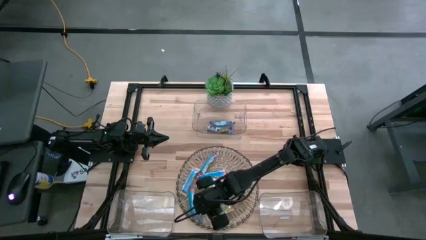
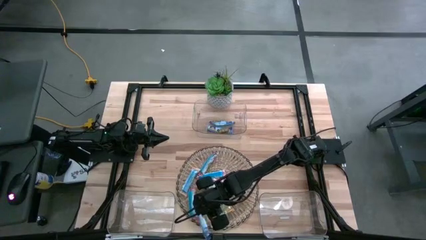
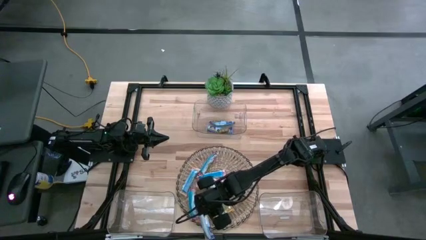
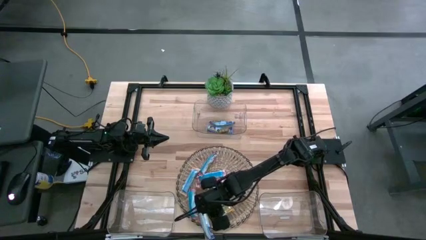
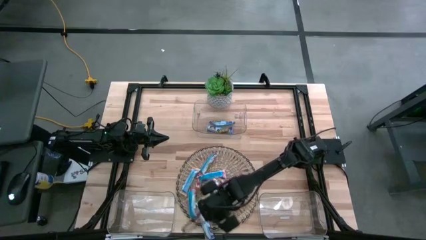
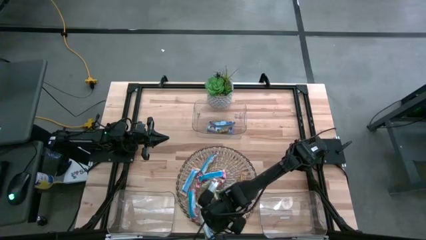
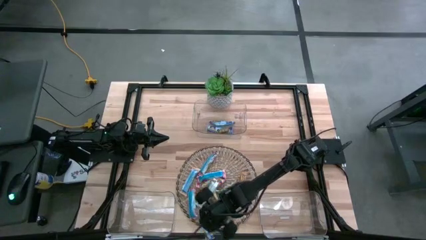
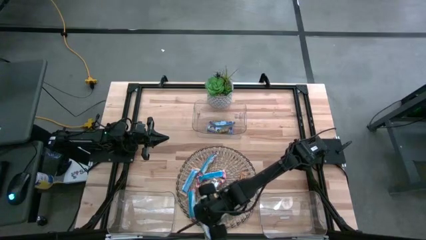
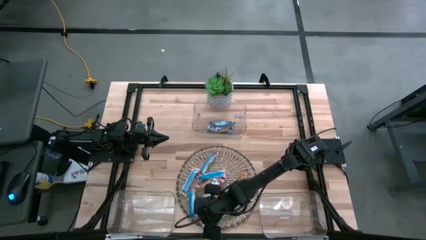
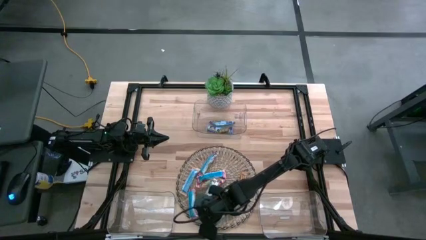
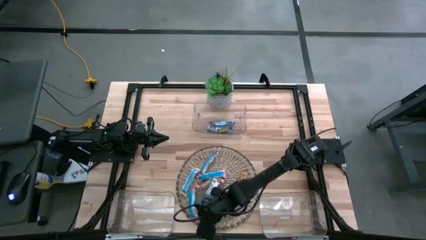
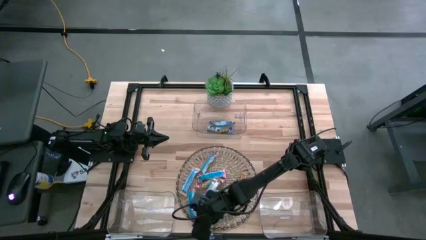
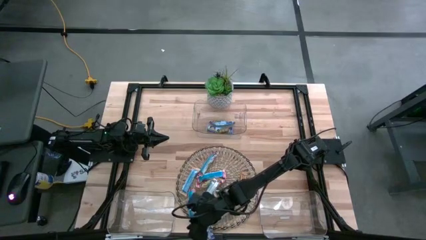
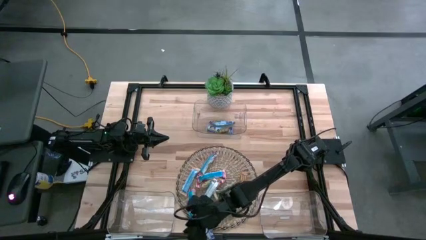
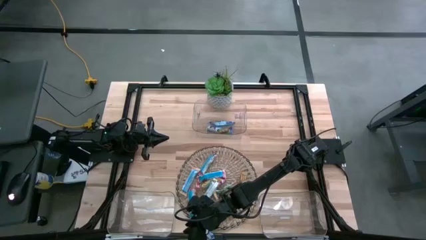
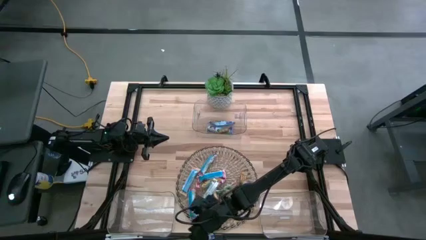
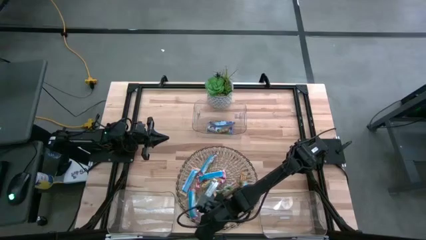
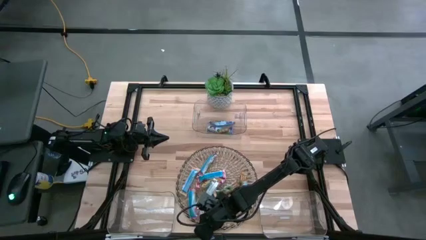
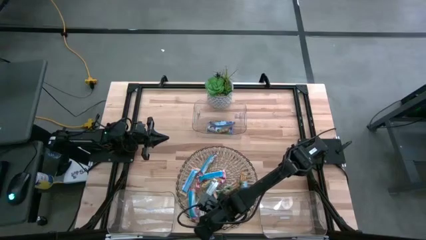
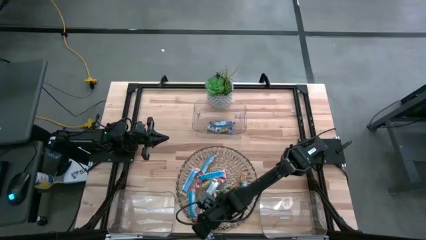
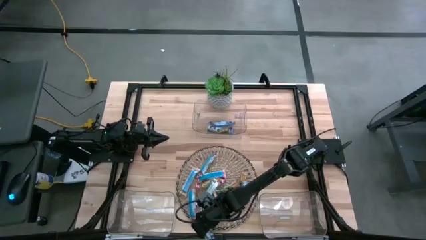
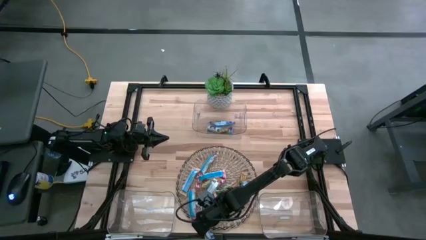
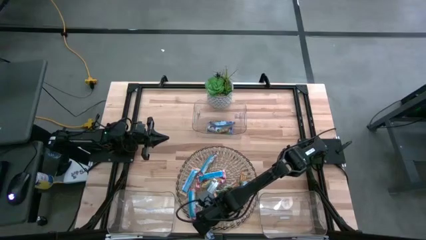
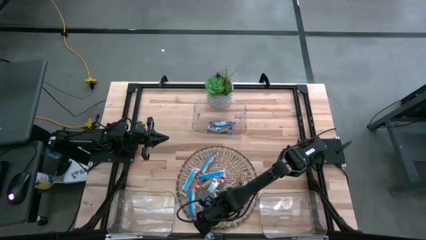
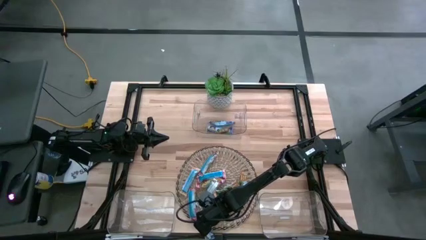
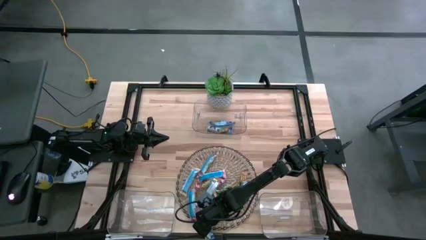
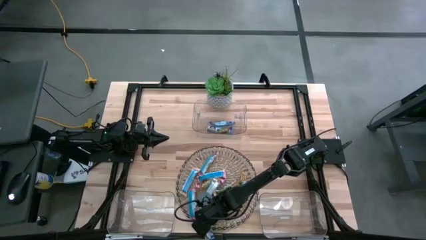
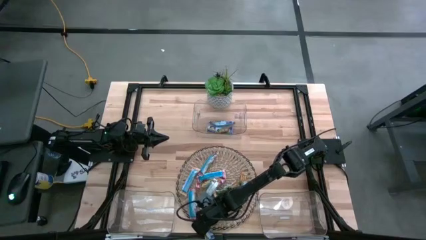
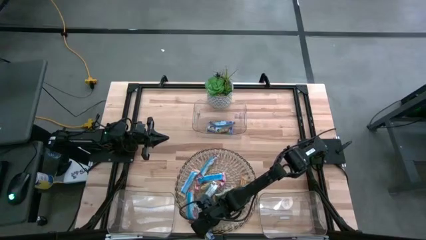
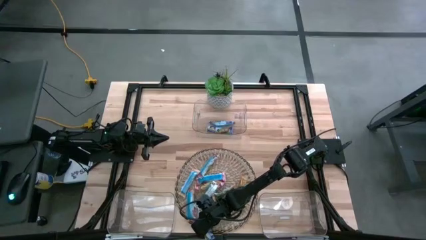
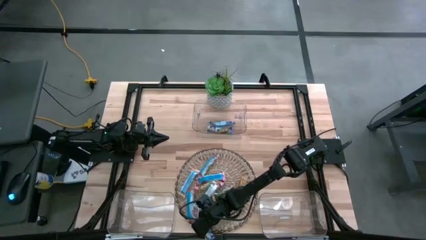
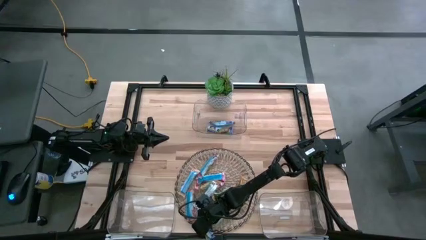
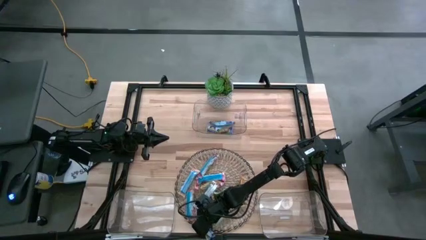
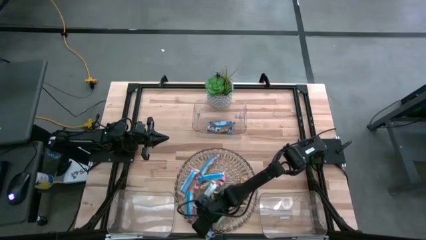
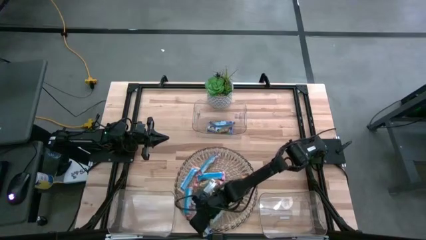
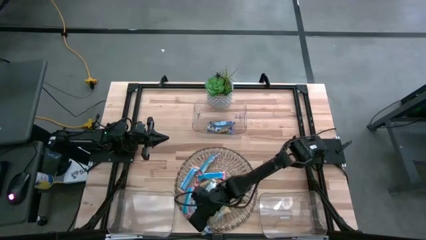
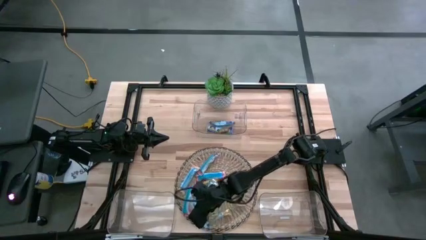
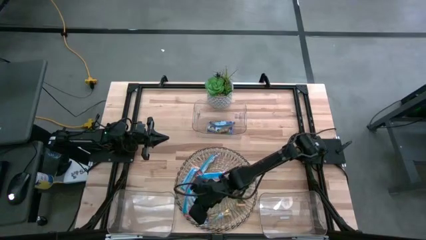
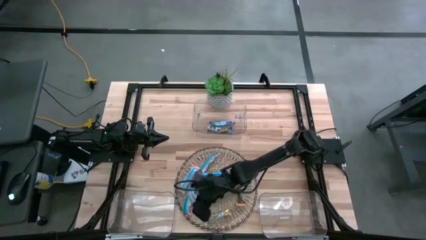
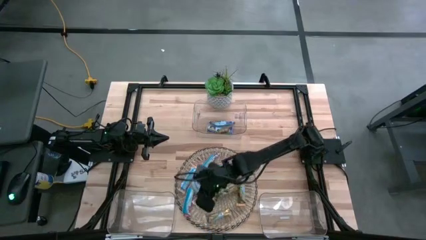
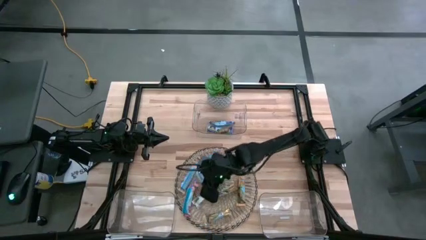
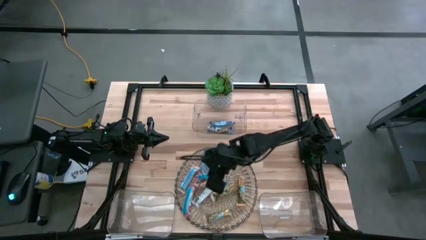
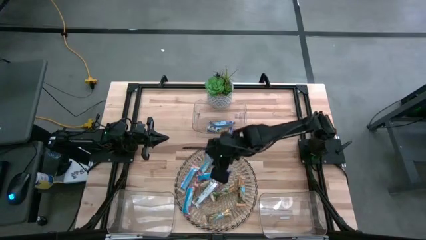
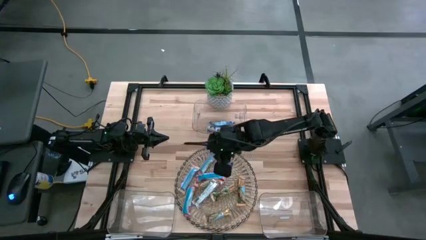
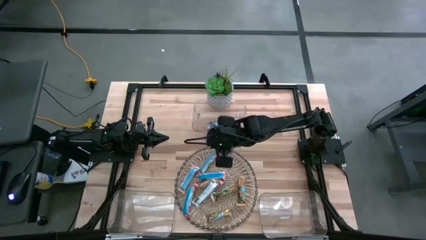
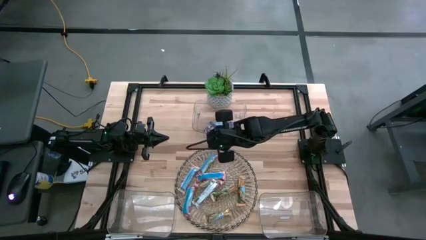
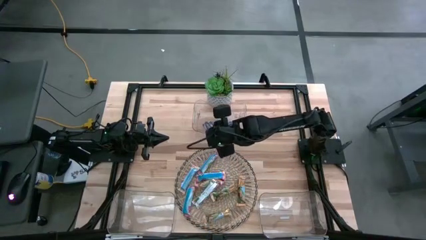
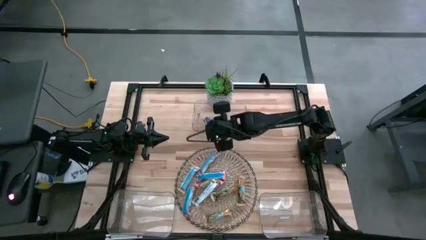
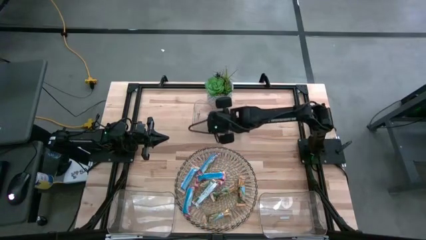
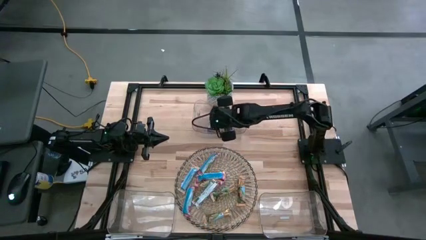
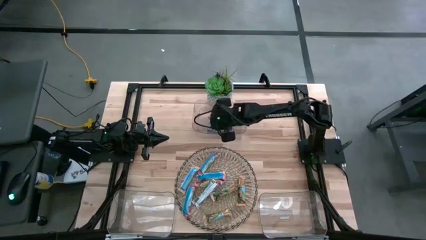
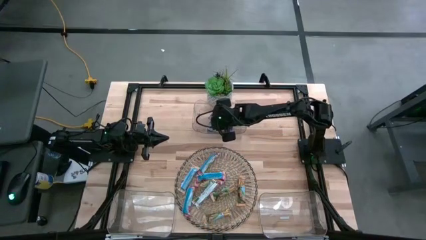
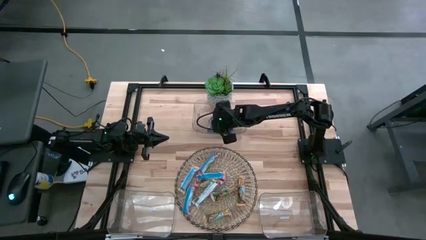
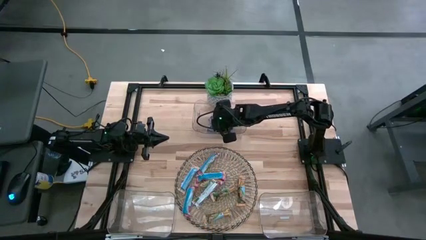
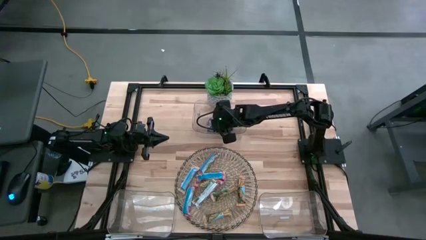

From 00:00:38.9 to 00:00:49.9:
Task: Pick and place Granola Bars by type
Put the blue granola bar into the top transparent bin

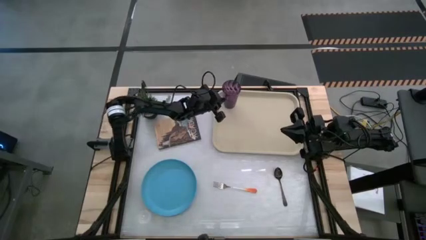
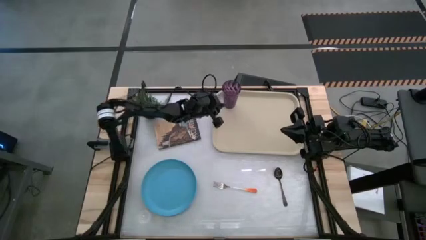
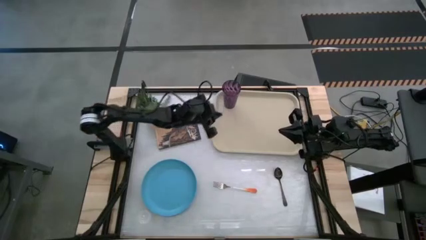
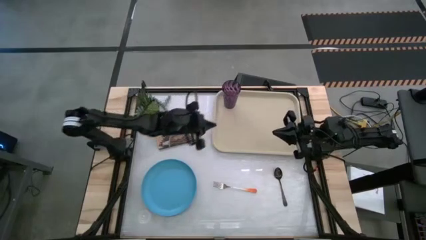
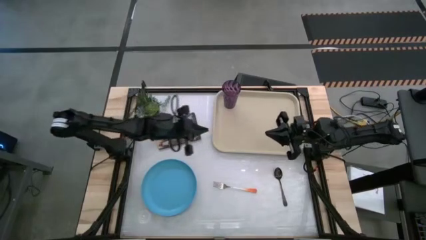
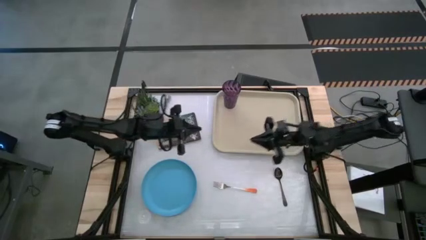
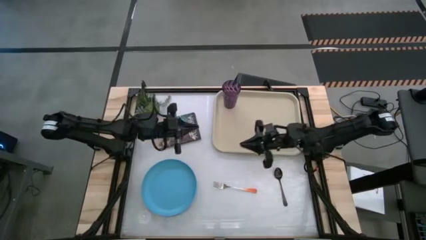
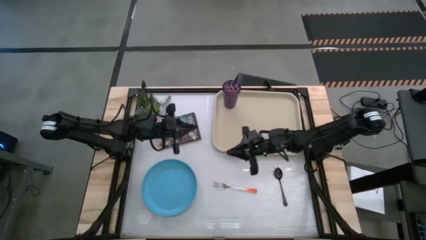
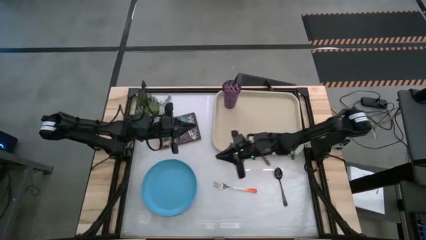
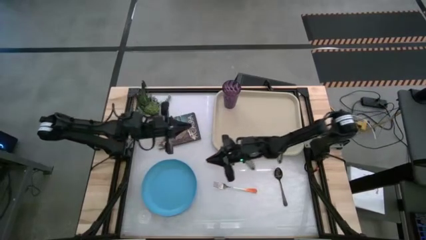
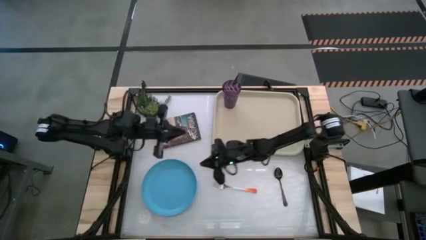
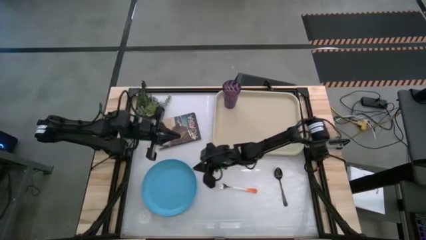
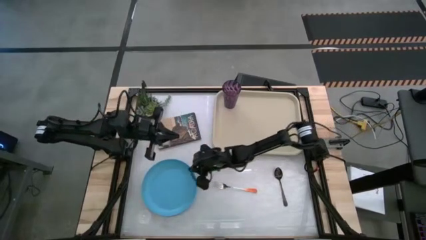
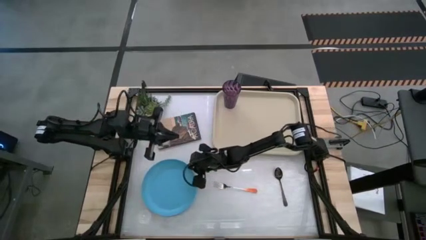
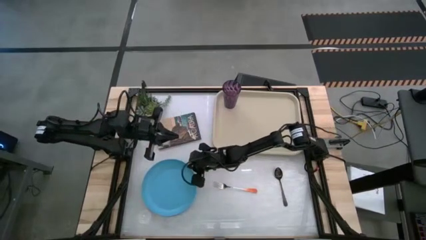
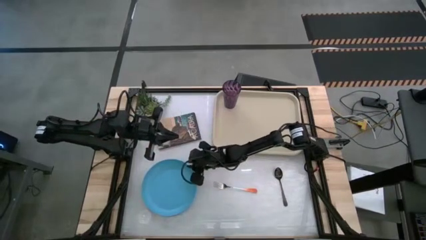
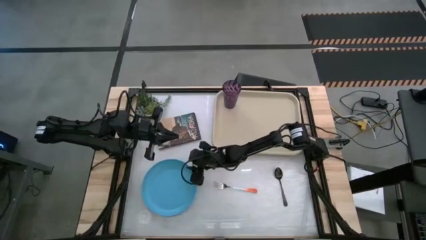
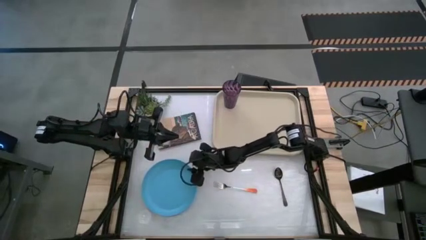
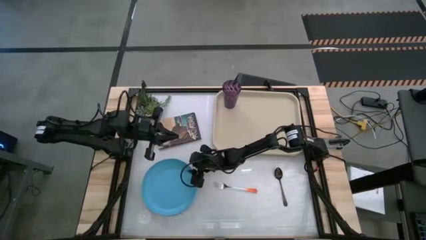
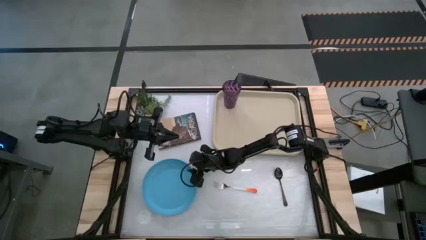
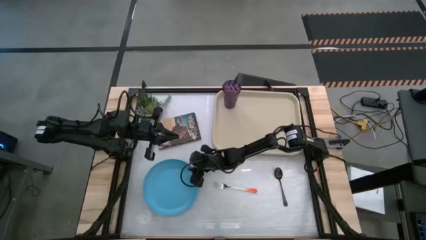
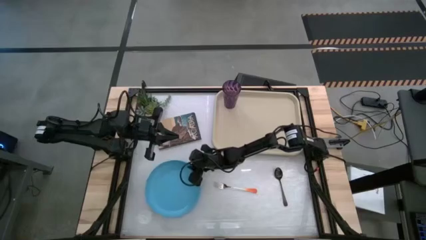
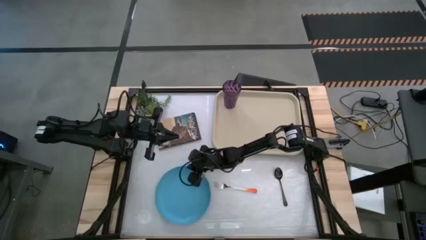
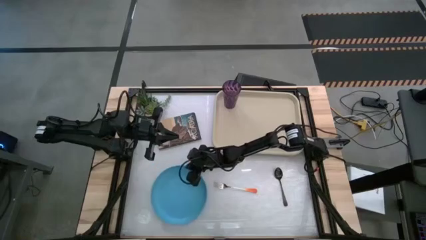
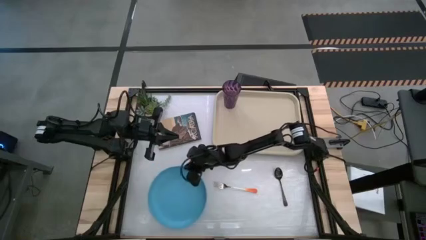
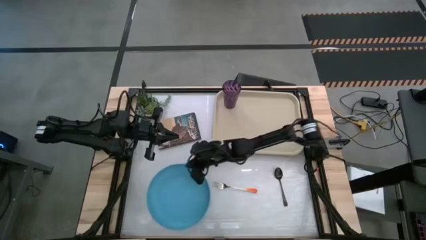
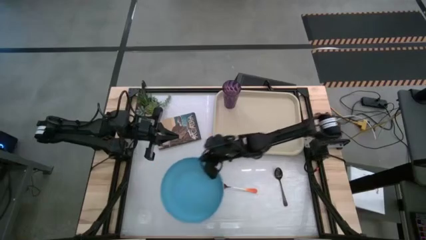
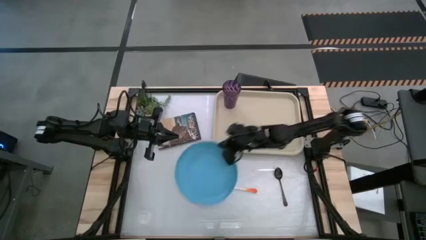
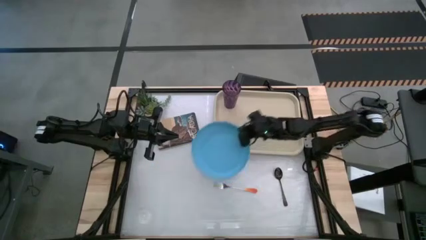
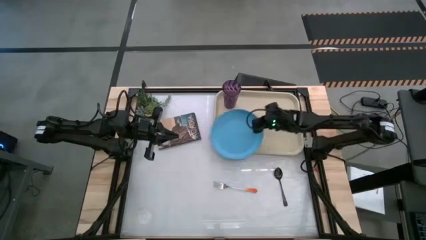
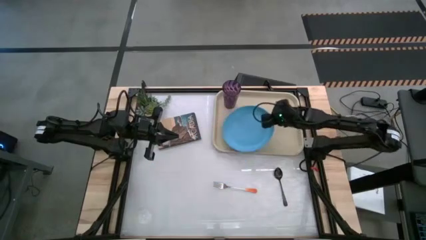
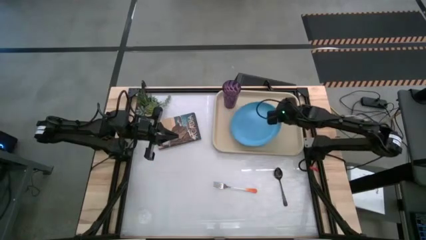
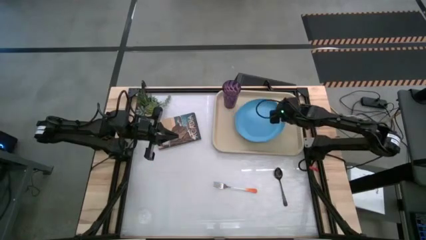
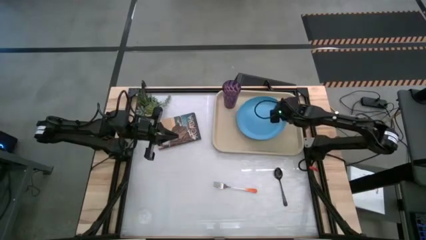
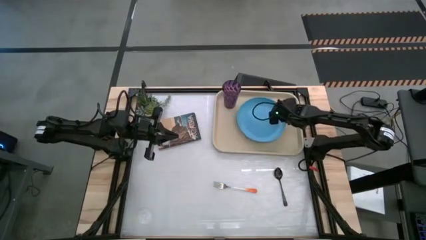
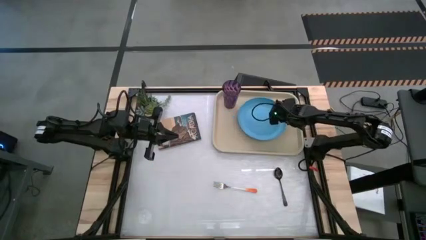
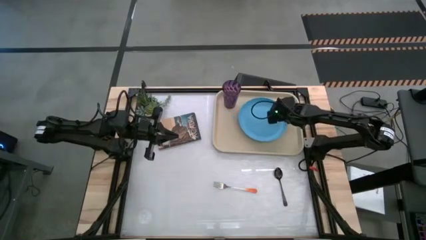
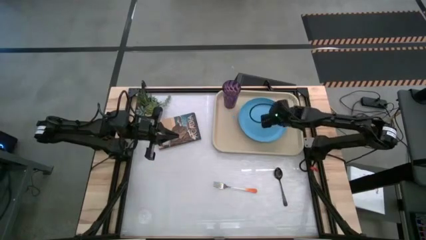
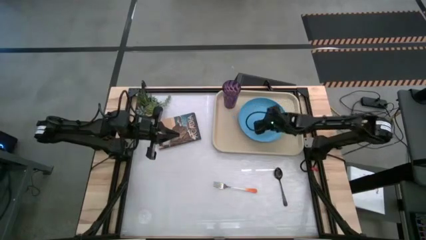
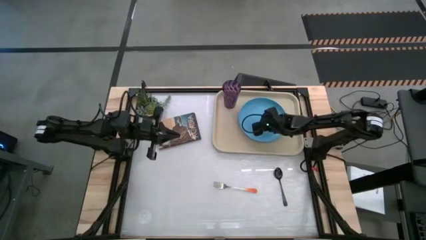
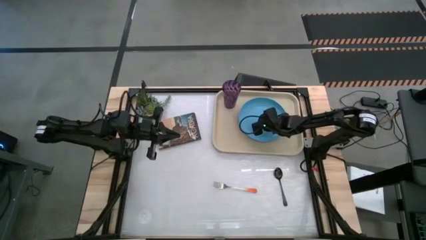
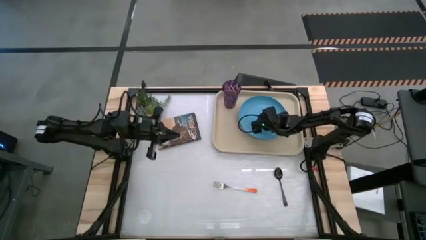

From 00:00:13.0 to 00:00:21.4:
Task: Pick and place plate/cup/fork/spoon on tray
Put the blue plate on the tray to the bottom right of the purple cup
